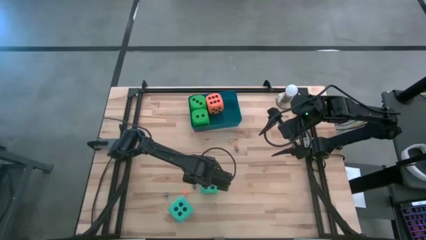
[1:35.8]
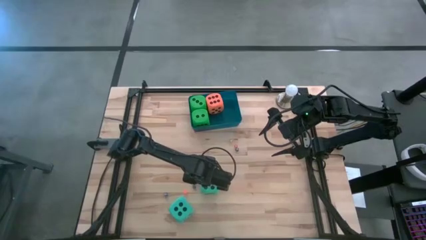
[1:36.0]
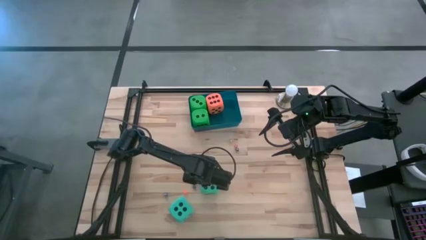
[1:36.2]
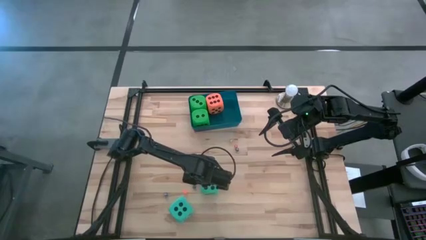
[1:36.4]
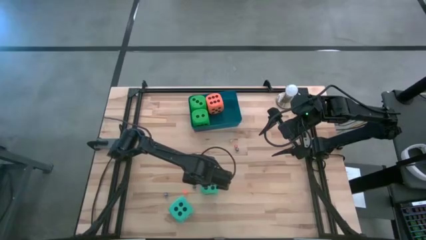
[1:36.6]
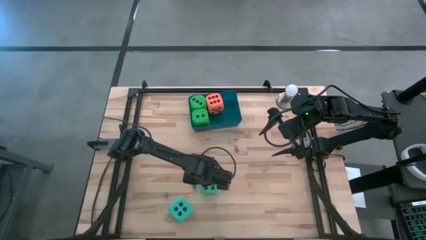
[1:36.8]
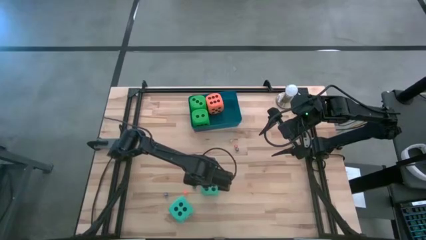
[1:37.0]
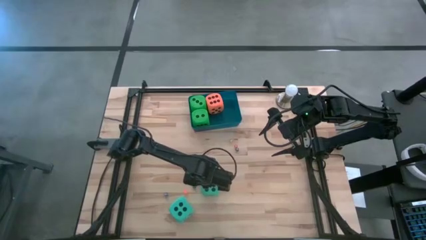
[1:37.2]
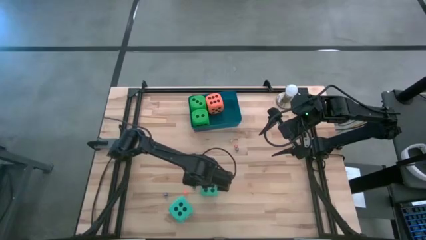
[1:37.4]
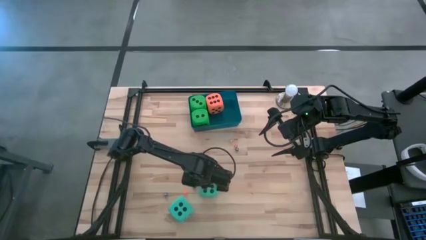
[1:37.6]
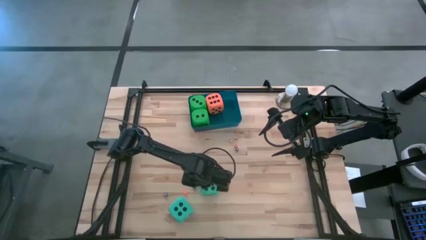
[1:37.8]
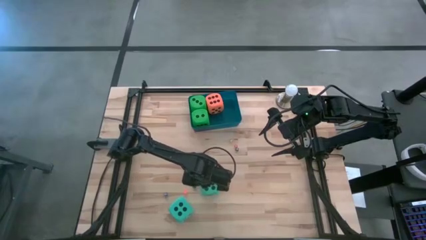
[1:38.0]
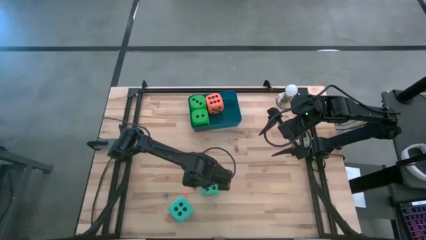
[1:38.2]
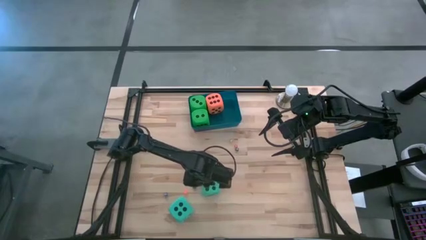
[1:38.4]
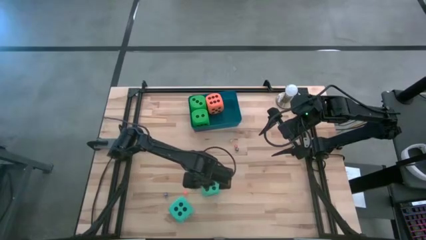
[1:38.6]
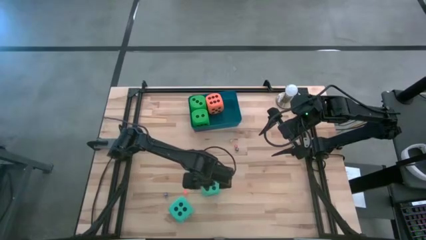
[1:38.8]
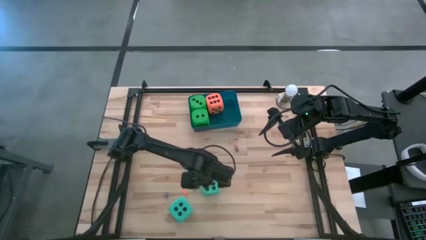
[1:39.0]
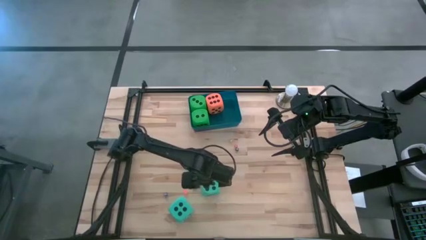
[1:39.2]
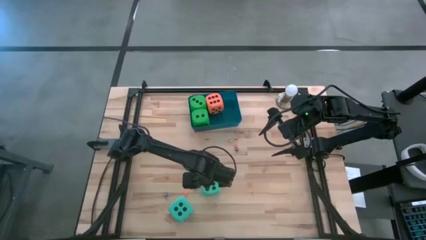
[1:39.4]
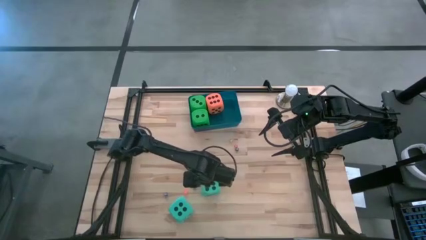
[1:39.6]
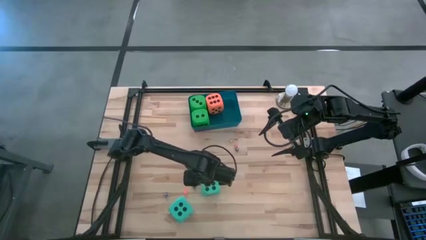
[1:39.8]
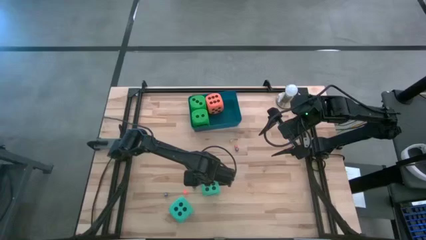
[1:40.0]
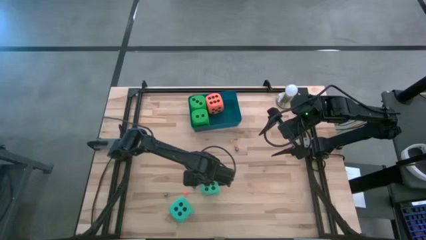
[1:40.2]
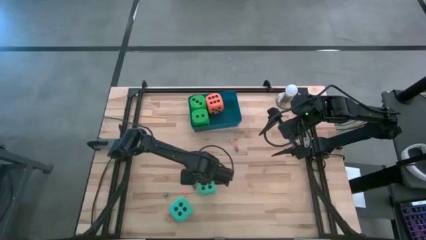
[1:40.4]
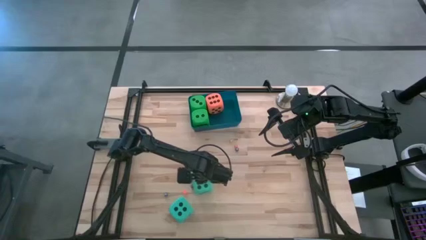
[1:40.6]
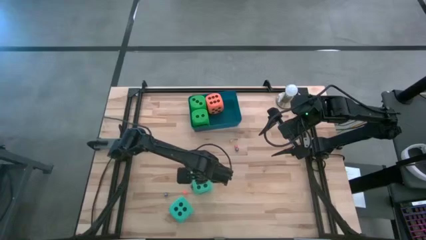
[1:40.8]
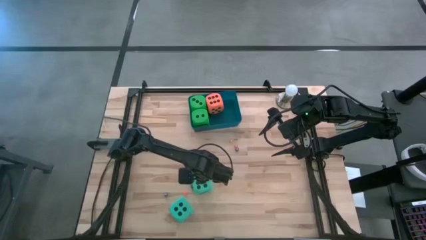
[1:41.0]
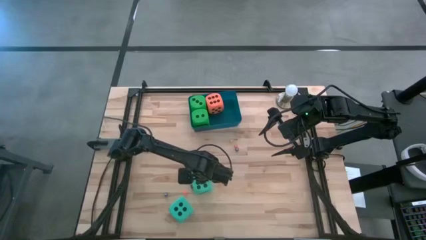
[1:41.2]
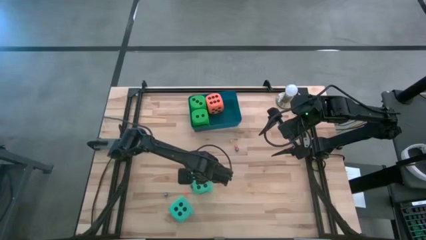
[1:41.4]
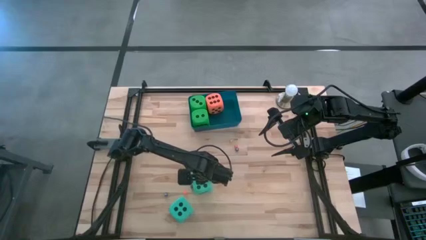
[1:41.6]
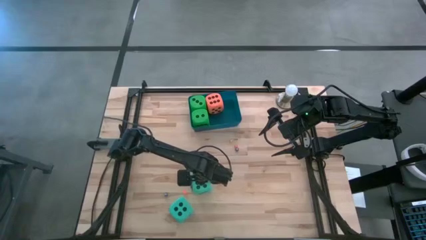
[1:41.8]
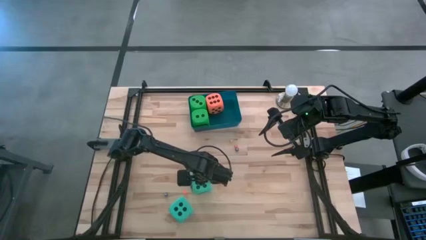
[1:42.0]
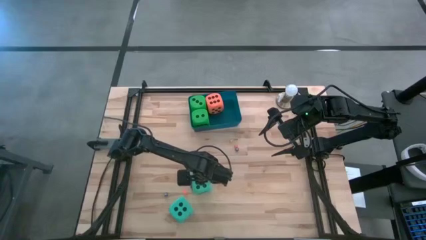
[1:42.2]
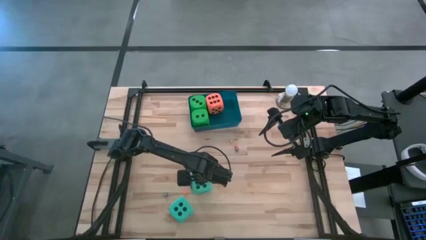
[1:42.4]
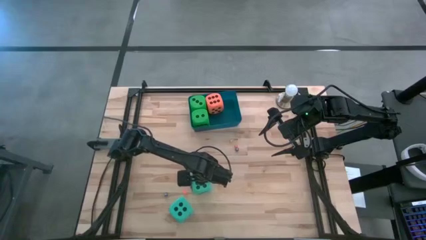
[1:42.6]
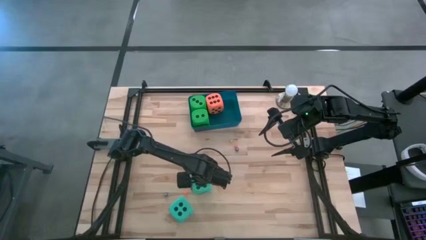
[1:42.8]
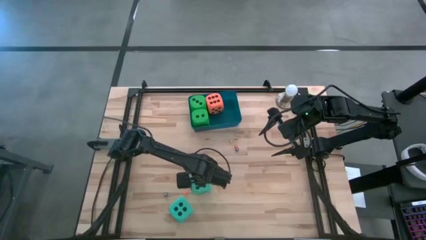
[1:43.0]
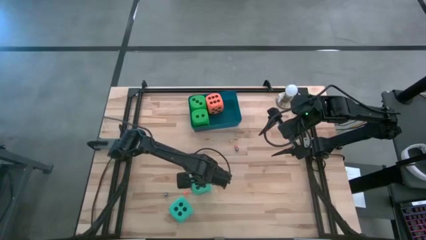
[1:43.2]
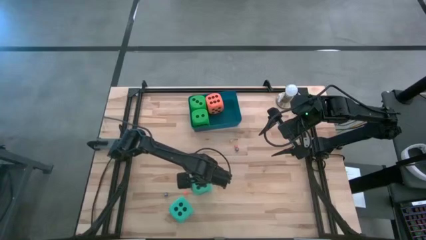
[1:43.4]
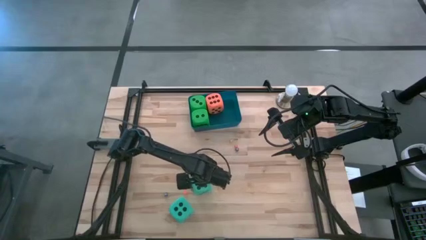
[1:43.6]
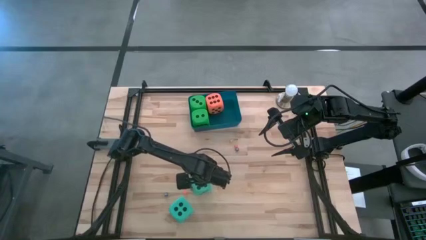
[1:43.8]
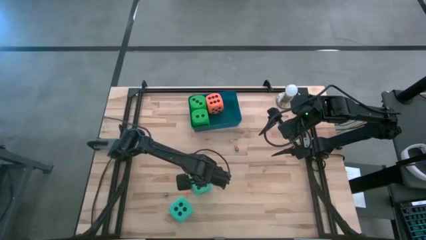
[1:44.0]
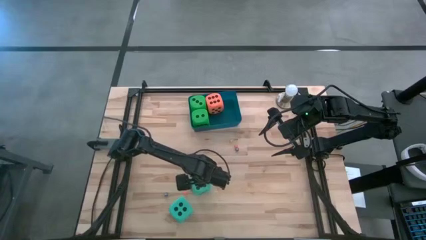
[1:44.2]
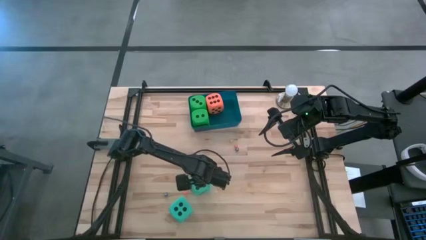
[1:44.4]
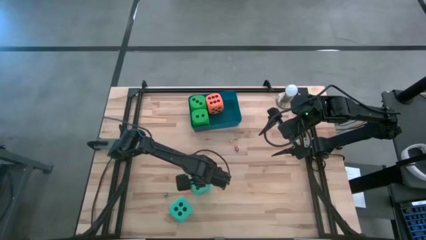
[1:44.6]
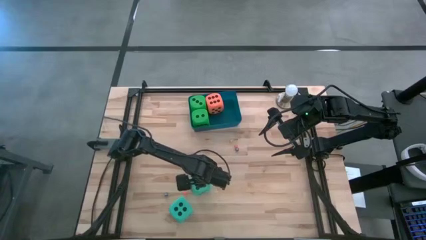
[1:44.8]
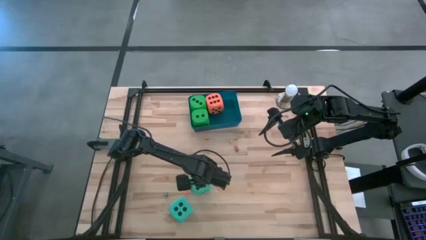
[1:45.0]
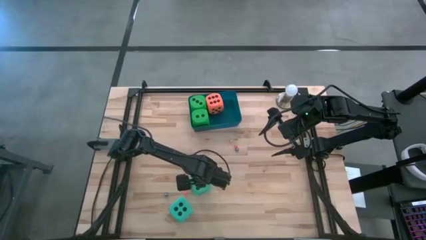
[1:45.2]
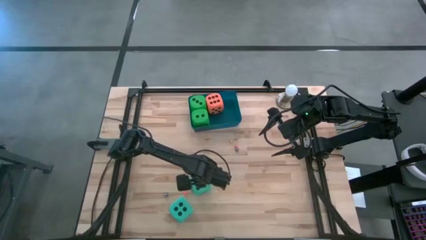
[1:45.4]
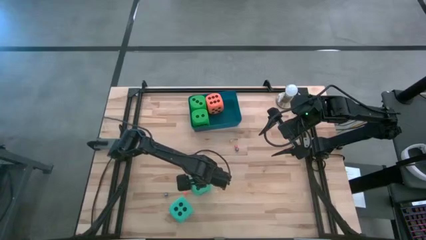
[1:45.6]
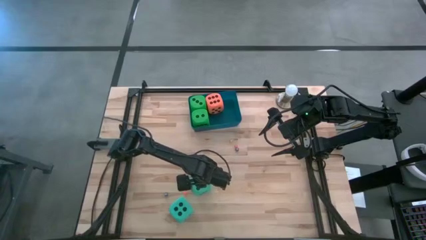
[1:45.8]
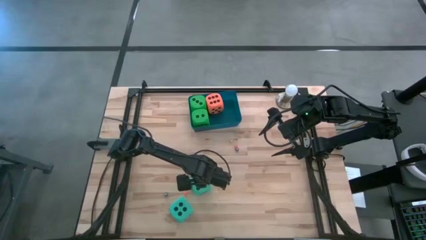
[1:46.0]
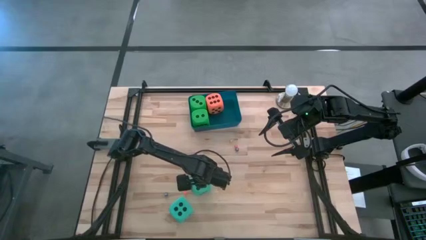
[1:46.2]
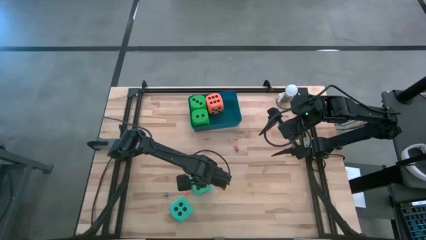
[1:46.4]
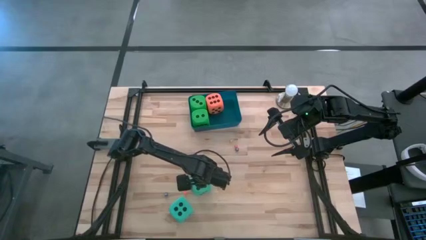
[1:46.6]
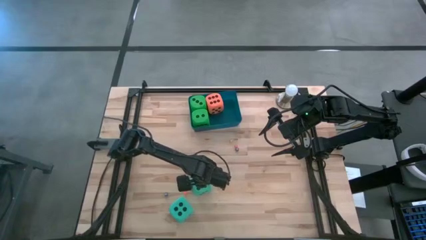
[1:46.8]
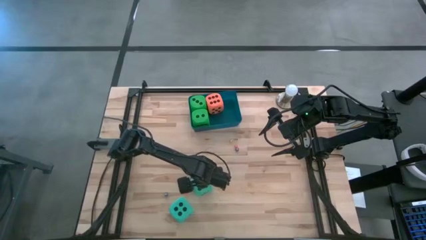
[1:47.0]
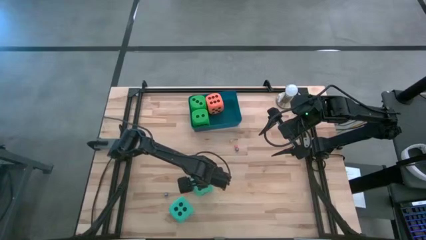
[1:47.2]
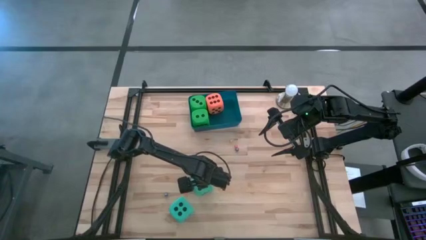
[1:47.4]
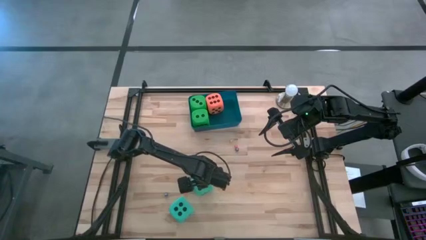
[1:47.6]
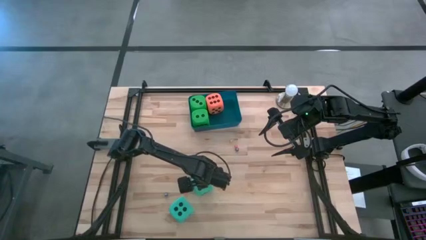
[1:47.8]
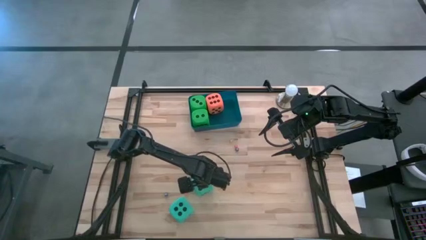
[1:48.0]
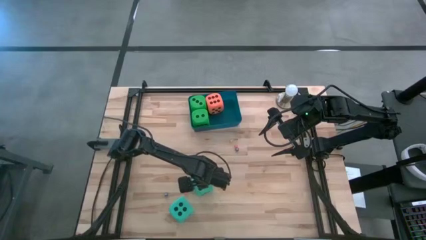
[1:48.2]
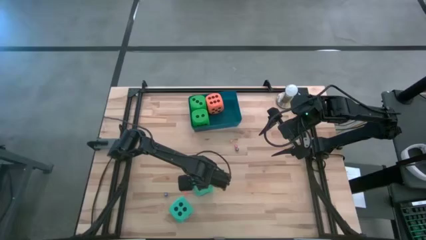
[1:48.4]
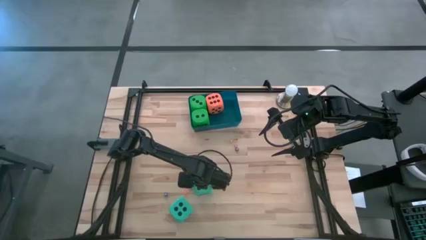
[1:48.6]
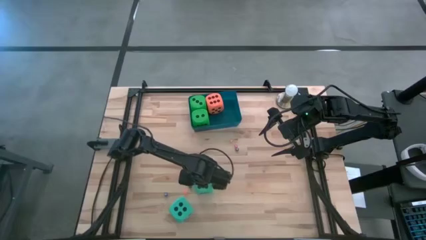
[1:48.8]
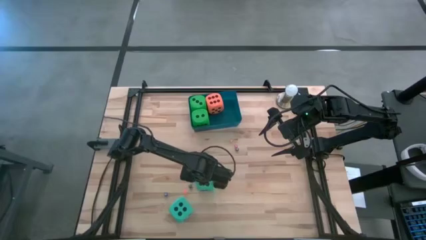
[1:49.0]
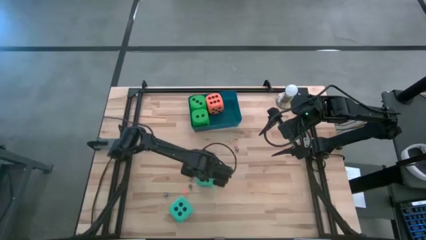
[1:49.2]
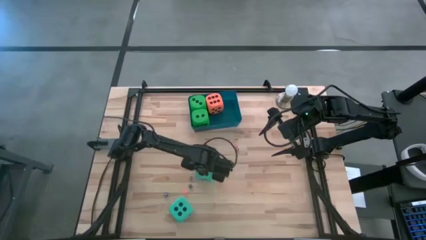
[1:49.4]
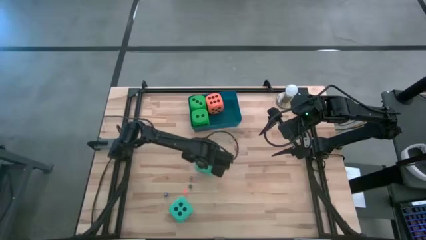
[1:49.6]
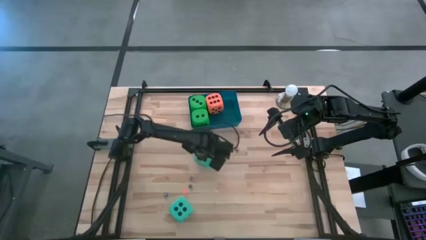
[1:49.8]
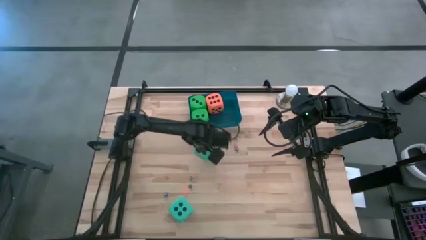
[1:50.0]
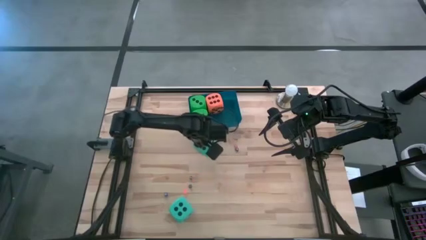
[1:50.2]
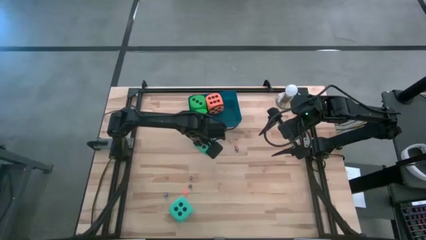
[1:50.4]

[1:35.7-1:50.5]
Task: Pick & Place Dice
Put the top blue dice into the blue bin
